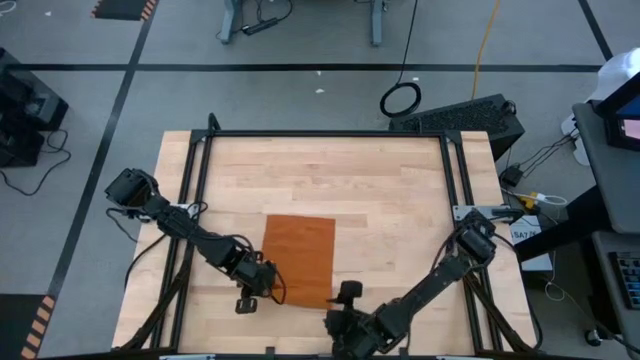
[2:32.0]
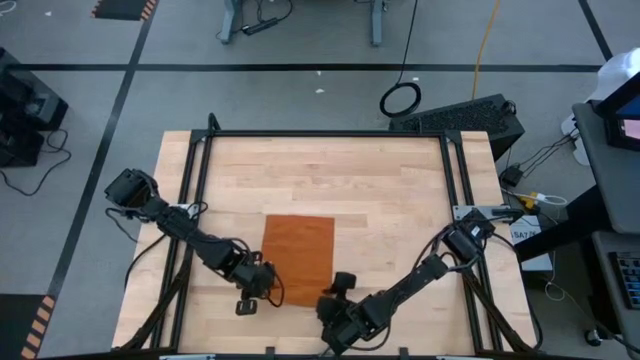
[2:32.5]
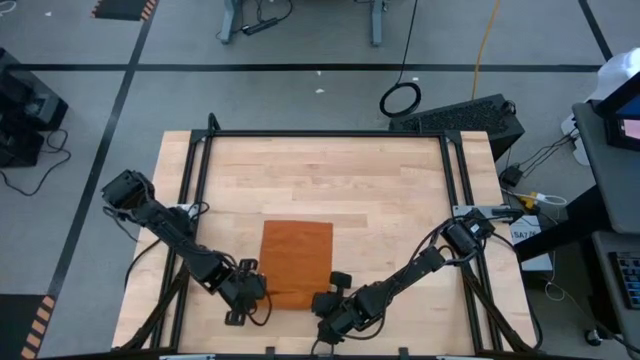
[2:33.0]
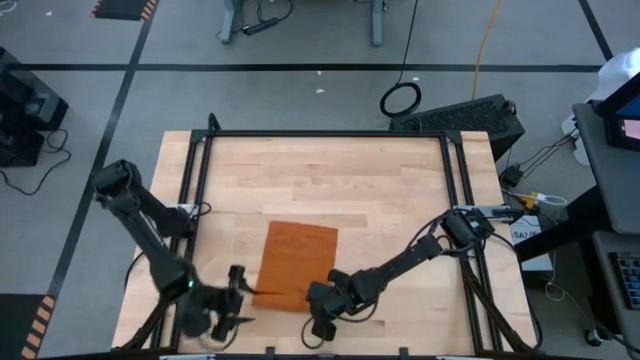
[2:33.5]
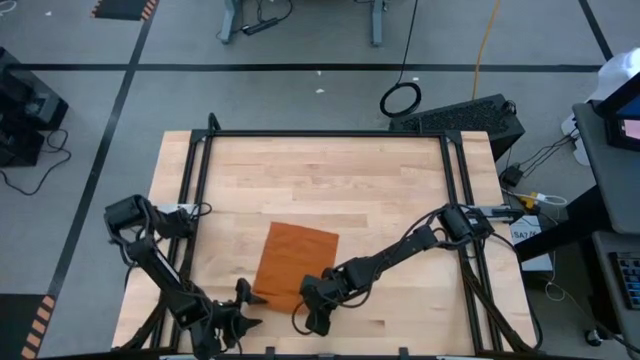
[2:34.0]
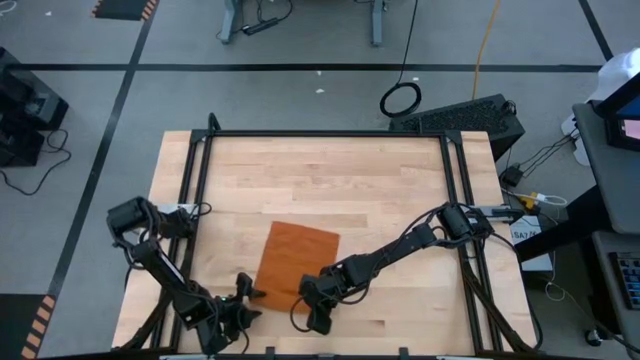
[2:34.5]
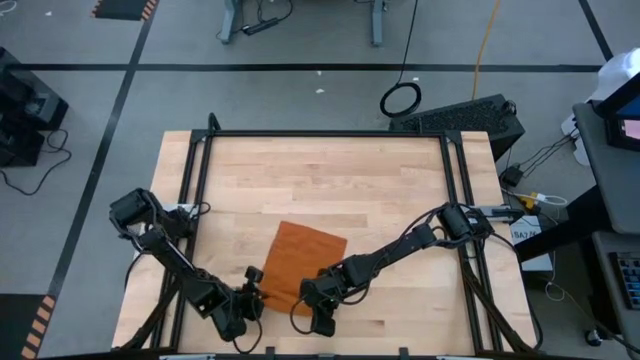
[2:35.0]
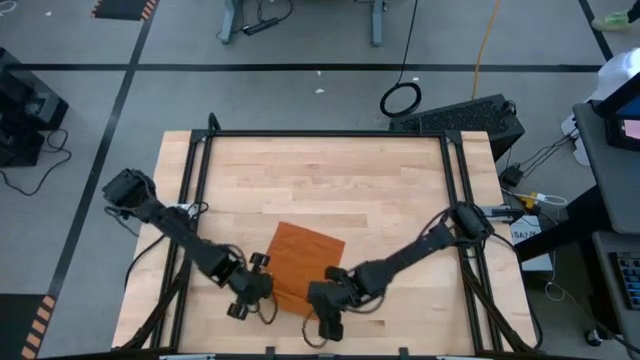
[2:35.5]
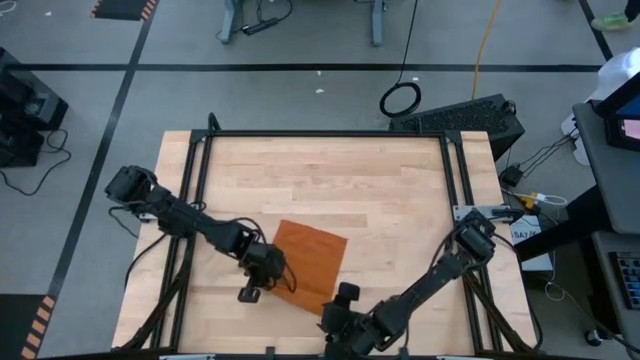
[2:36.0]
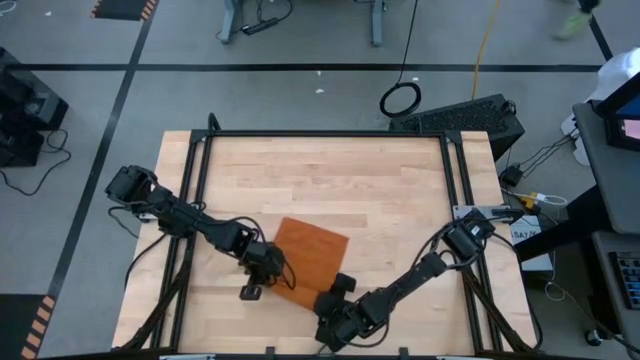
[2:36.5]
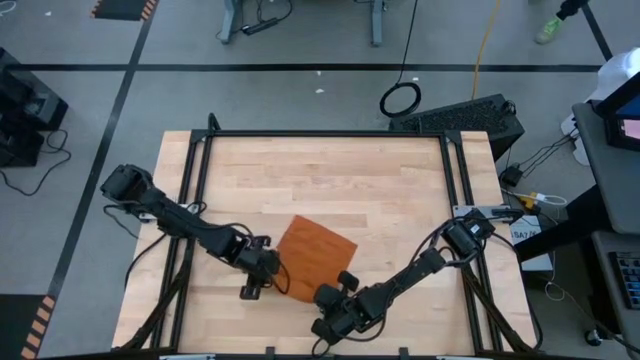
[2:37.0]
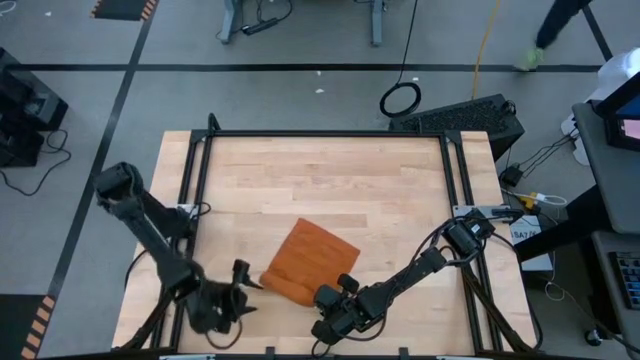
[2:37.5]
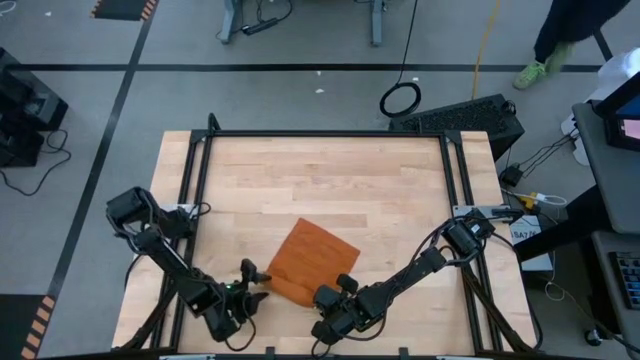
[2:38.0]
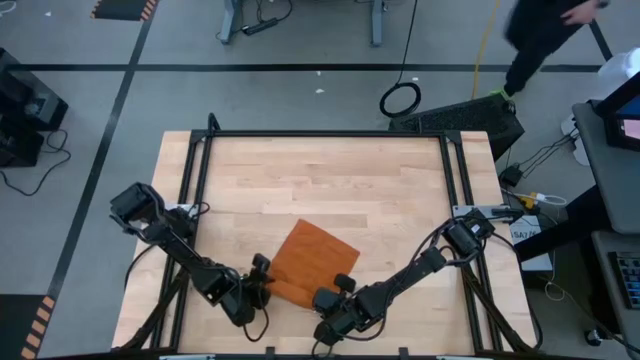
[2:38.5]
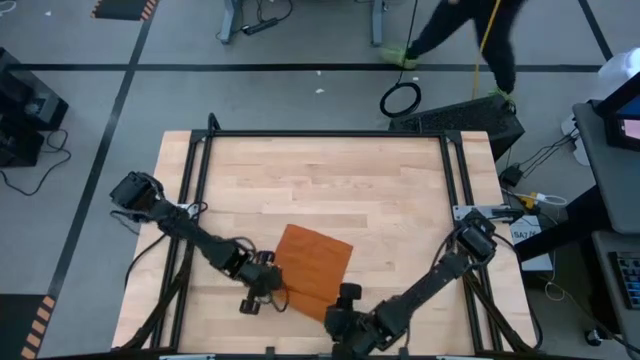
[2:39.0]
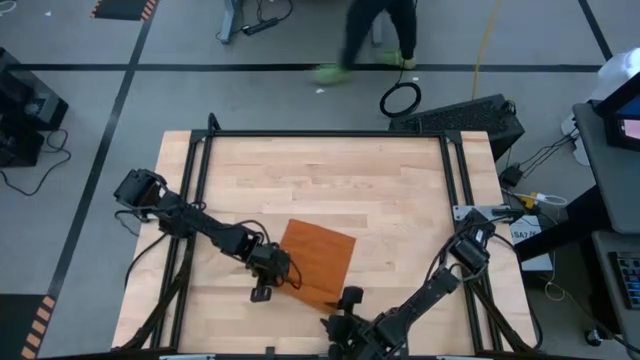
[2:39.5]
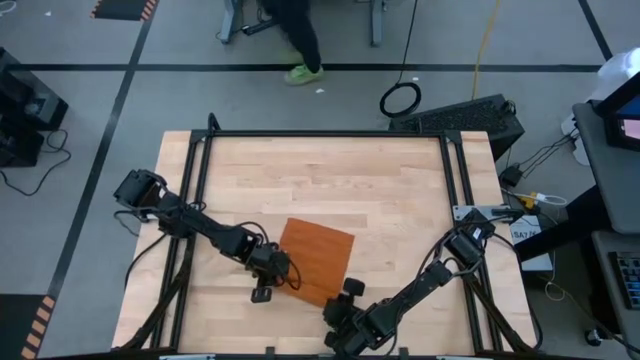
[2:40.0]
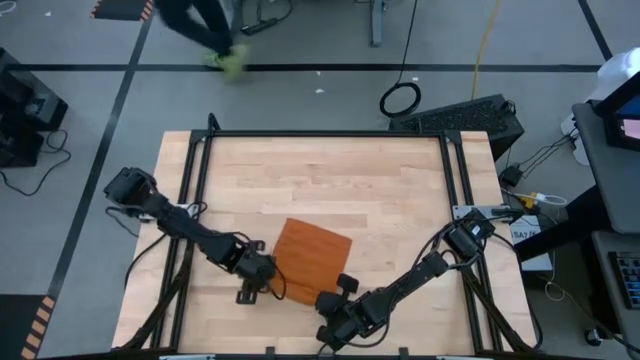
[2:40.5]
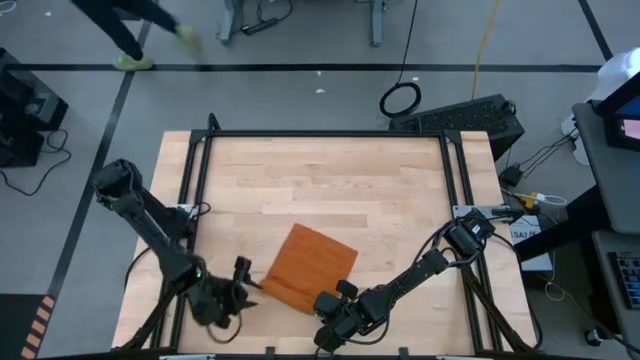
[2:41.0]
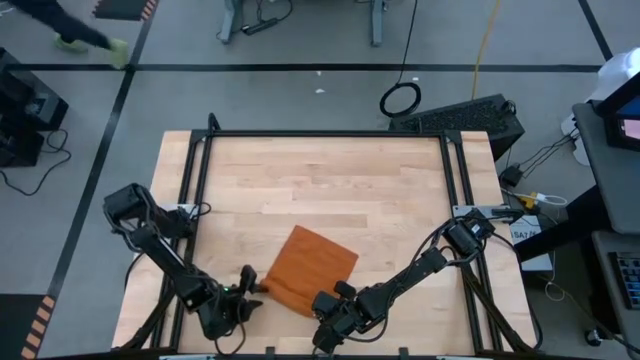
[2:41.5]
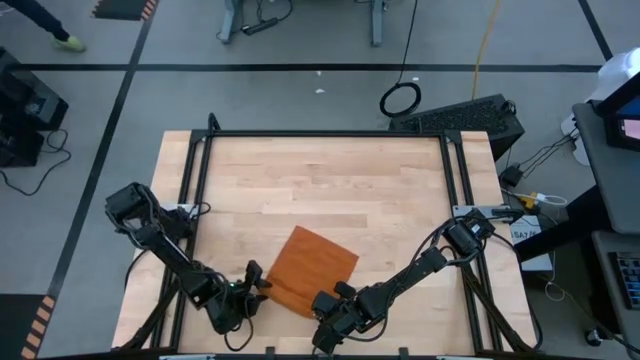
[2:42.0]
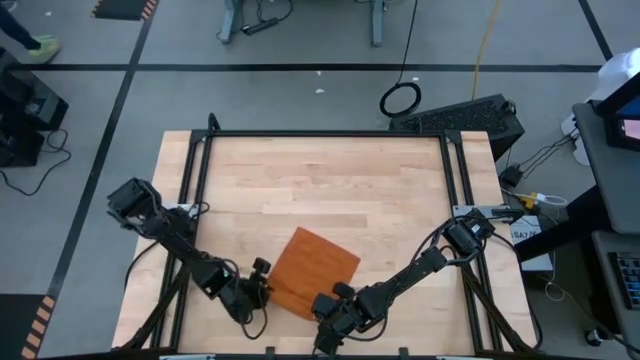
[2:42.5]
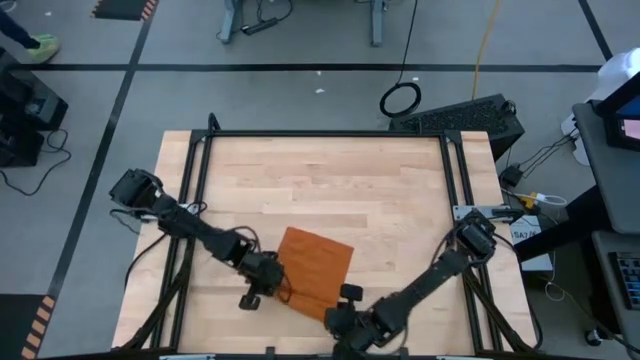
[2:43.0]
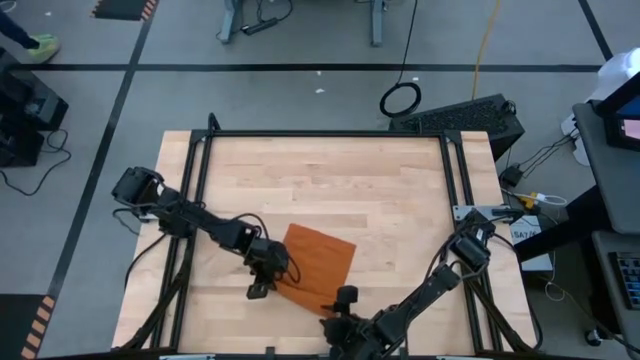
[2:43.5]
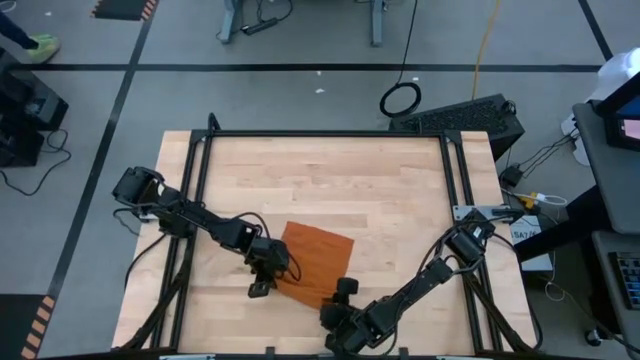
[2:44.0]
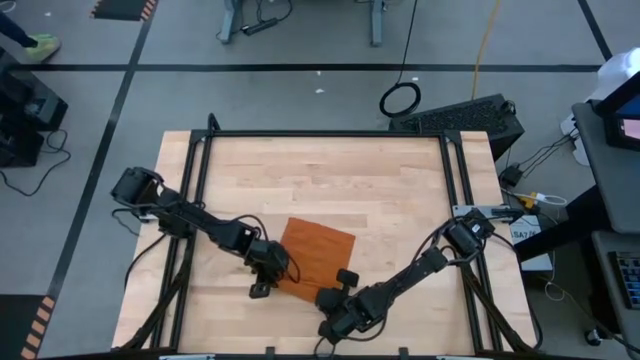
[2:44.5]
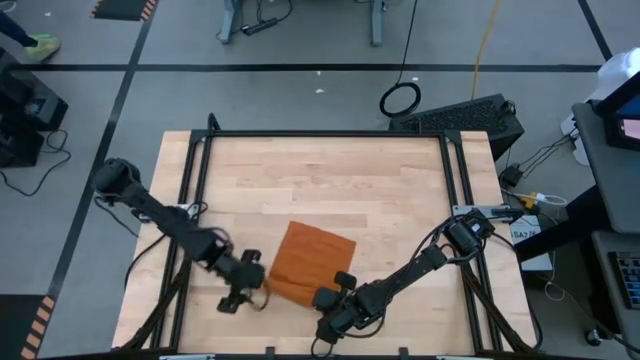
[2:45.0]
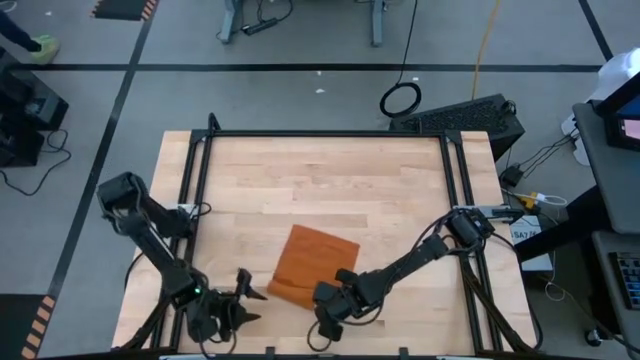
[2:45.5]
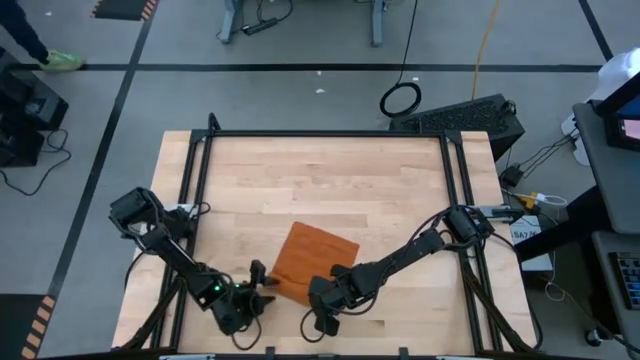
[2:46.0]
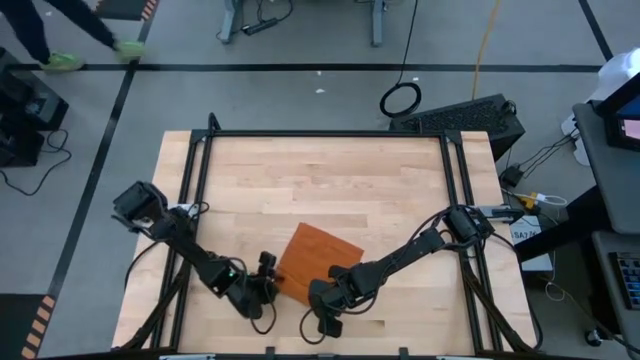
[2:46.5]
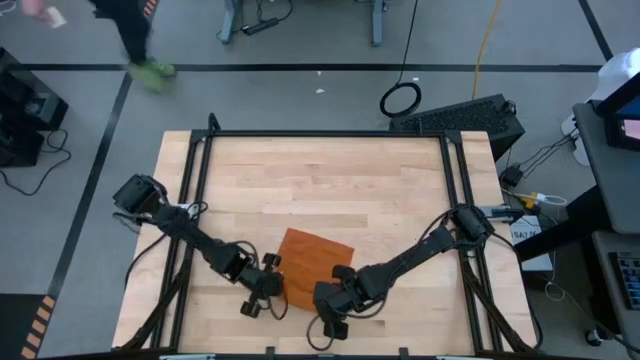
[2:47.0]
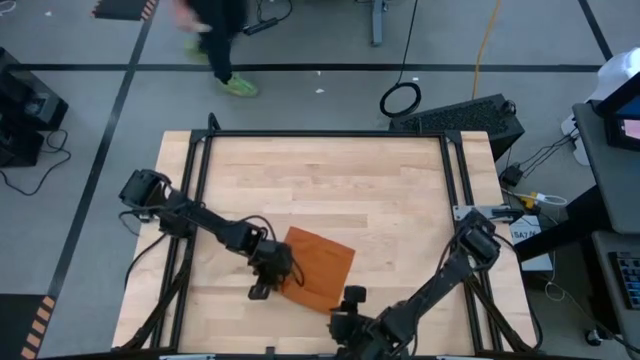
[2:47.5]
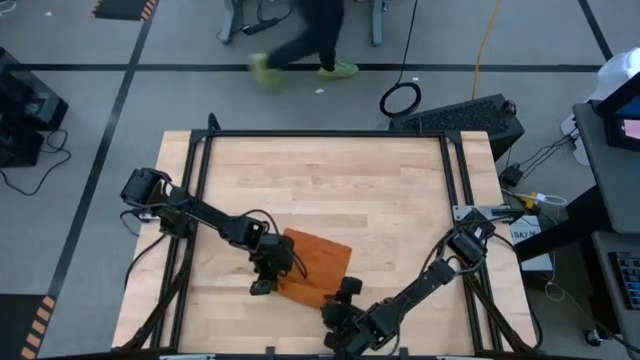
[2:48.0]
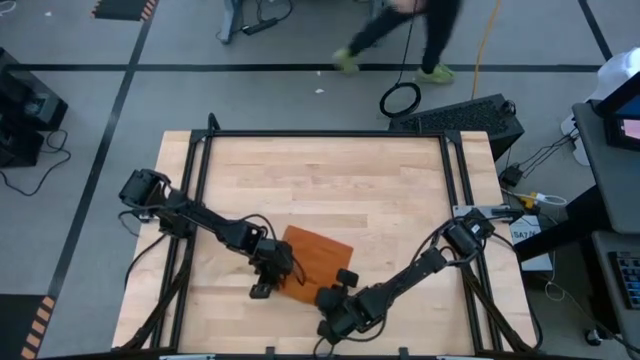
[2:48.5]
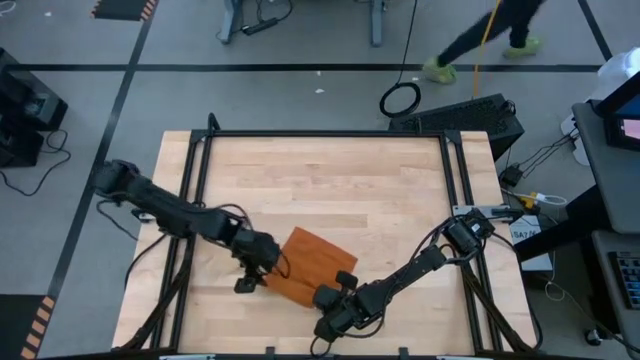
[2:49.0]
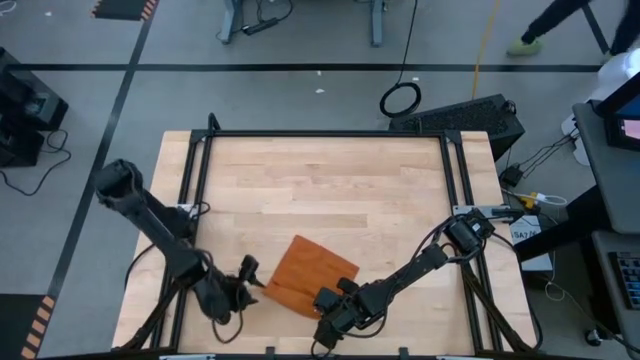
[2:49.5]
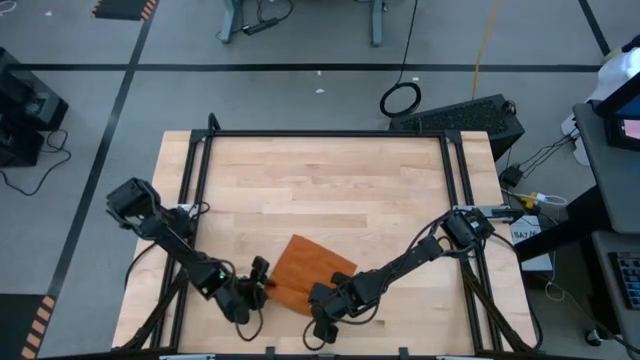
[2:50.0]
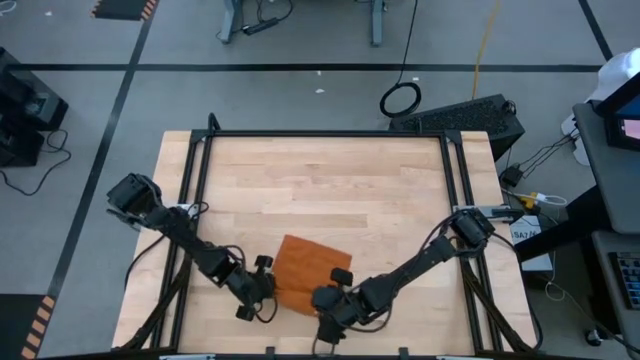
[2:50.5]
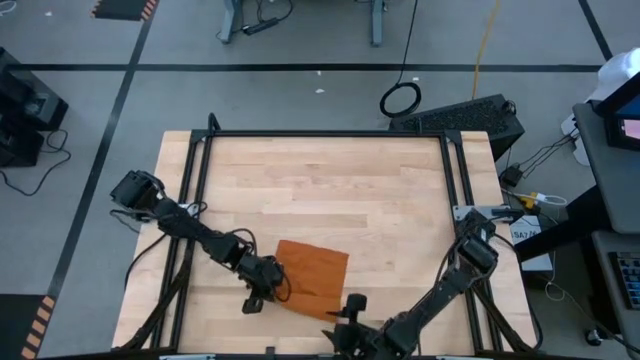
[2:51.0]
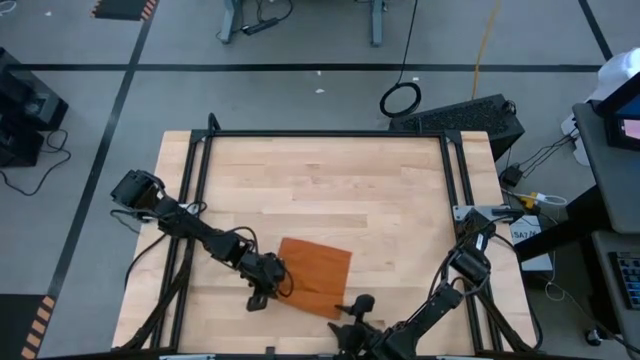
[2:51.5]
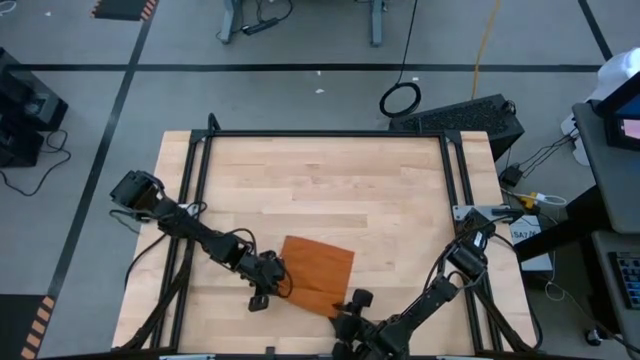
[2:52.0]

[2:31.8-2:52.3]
Task: Roll towel into tight, uniform cylinder
Roll the brown towel

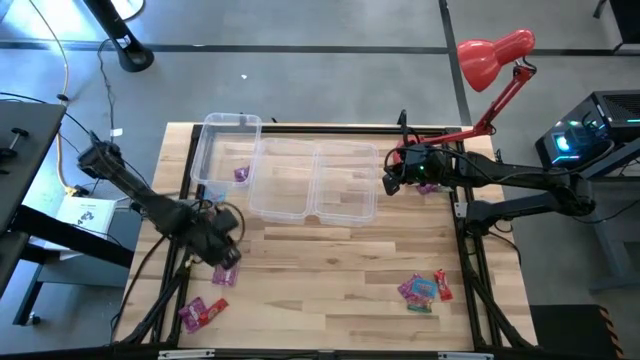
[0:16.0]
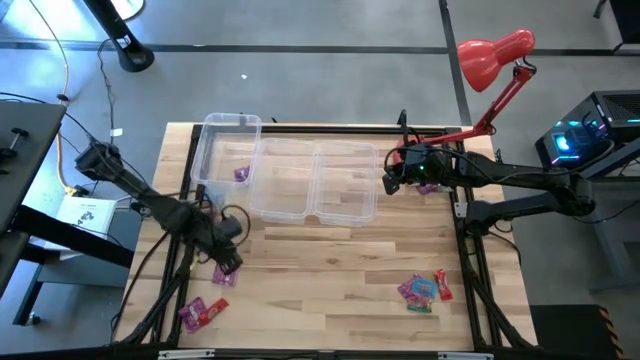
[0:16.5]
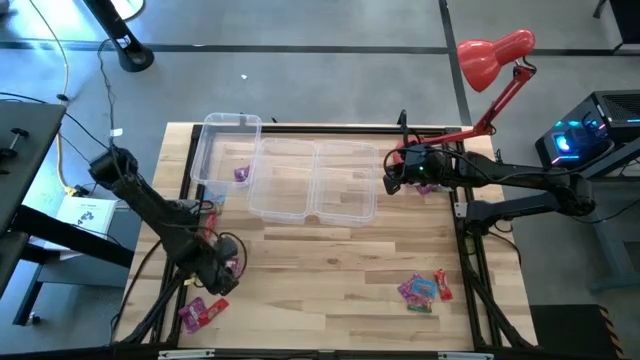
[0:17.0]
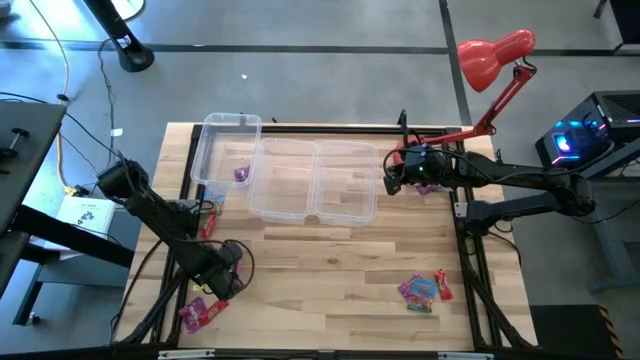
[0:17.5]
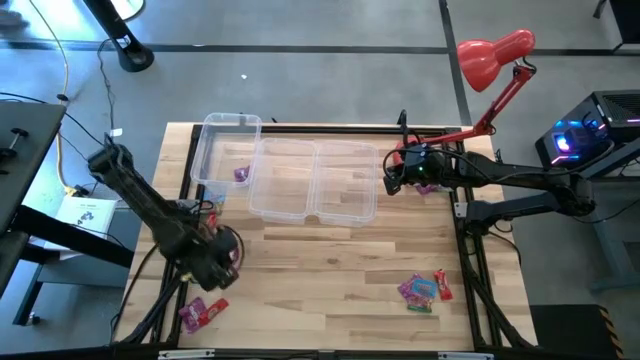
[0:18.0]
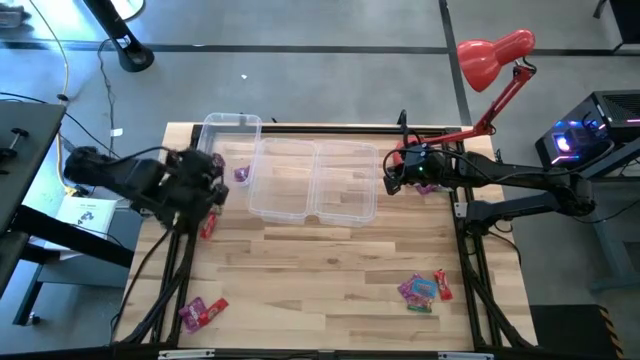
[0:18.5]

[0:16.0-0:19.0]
Task: Sort candy
Put the violet candy bag into the left transparent bin
